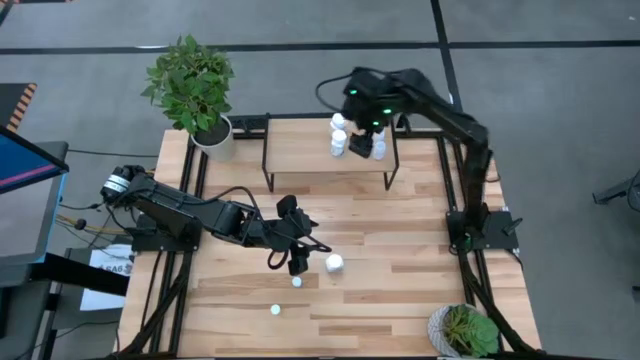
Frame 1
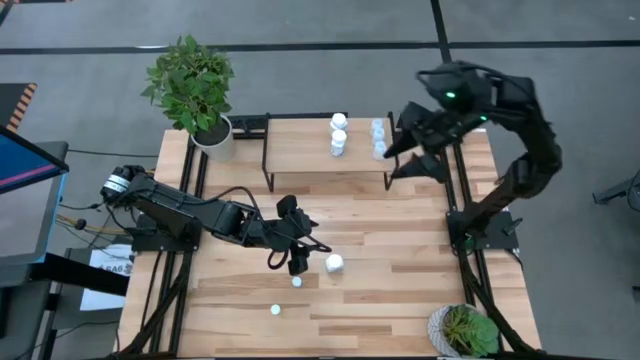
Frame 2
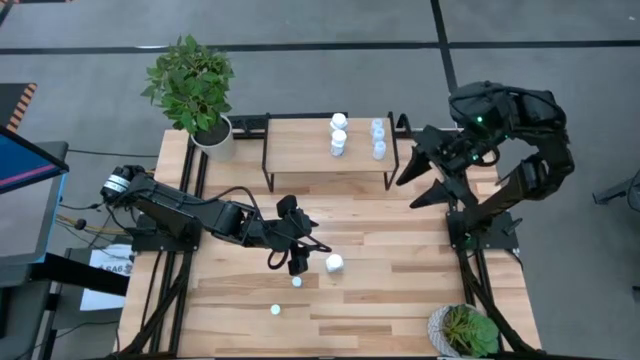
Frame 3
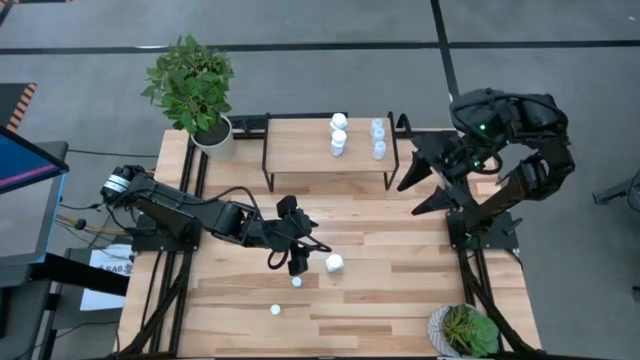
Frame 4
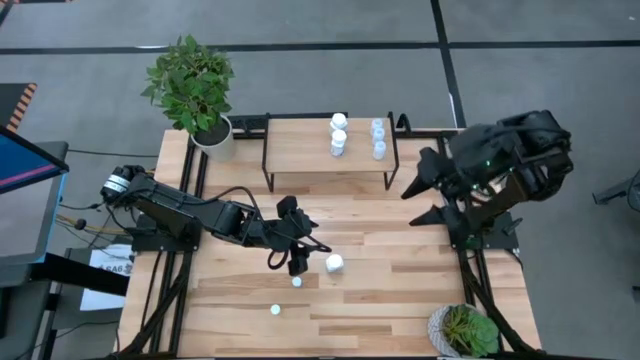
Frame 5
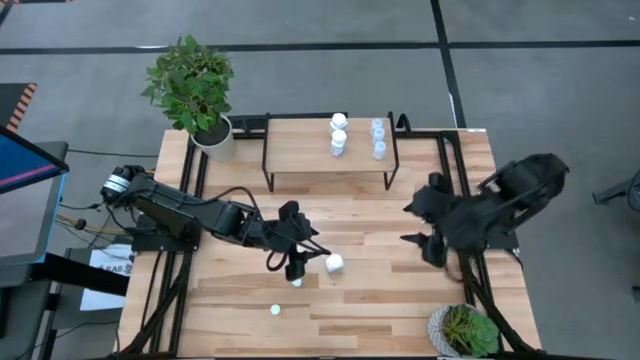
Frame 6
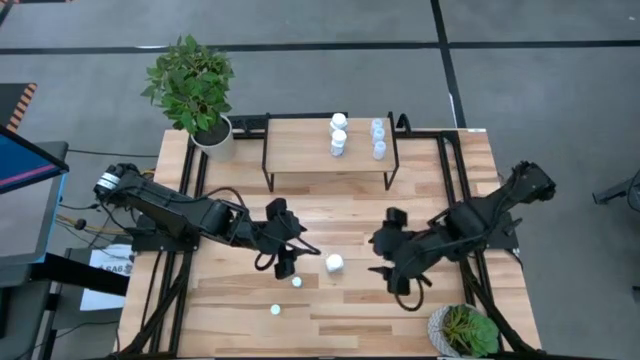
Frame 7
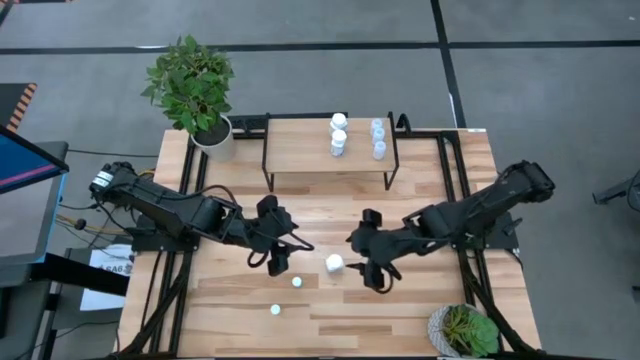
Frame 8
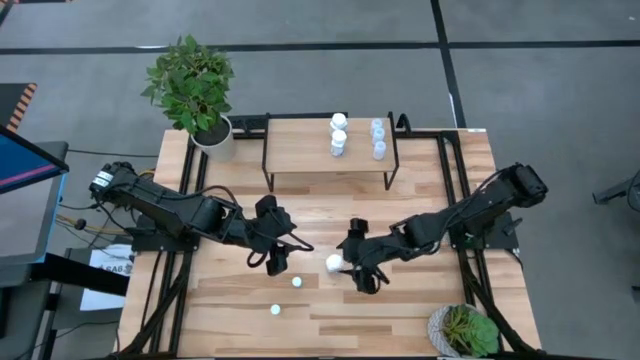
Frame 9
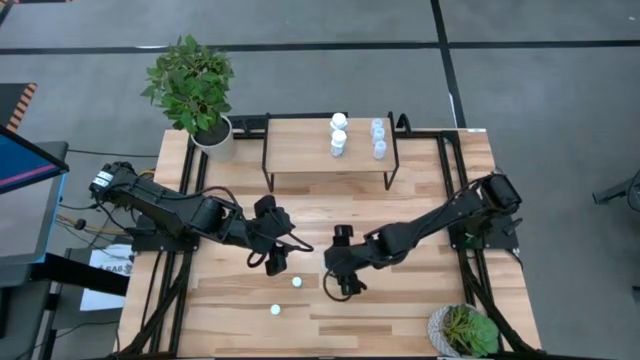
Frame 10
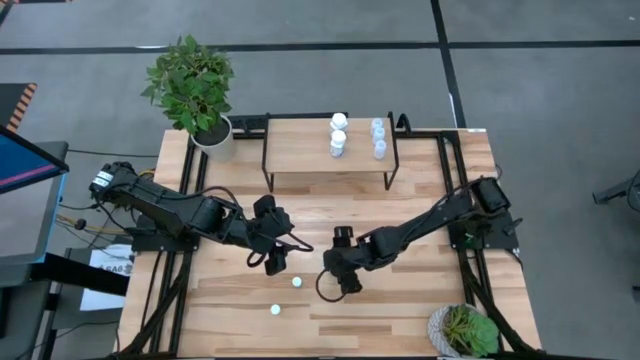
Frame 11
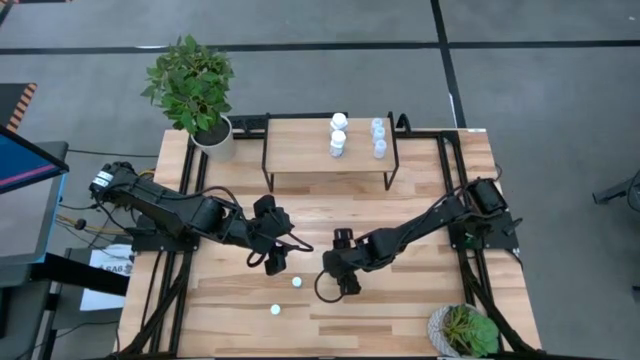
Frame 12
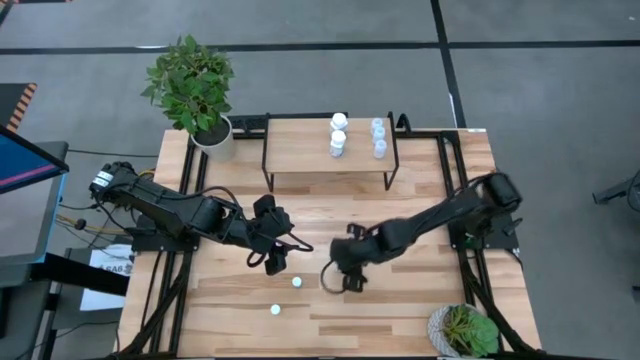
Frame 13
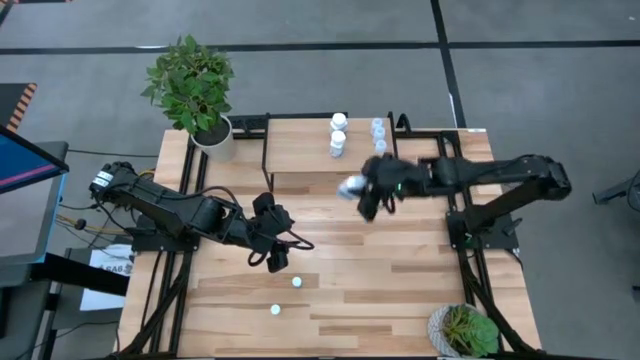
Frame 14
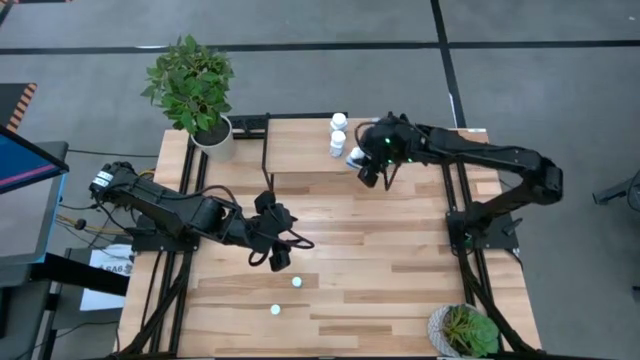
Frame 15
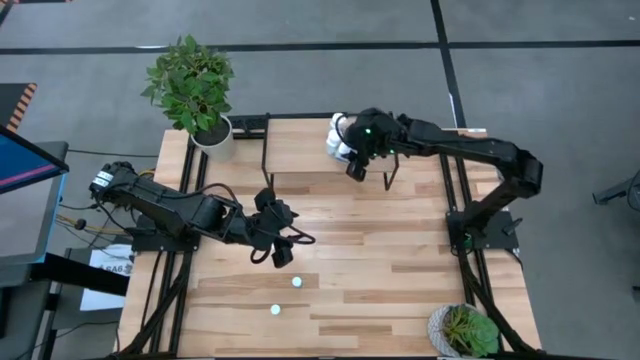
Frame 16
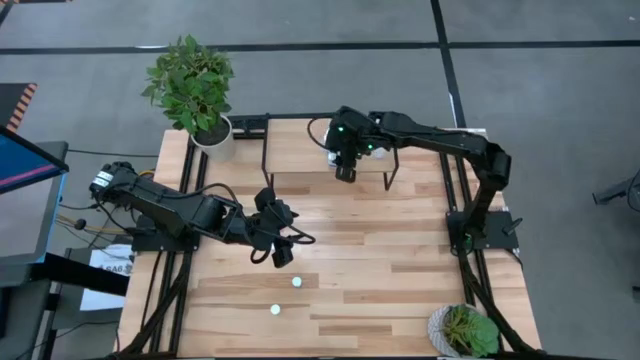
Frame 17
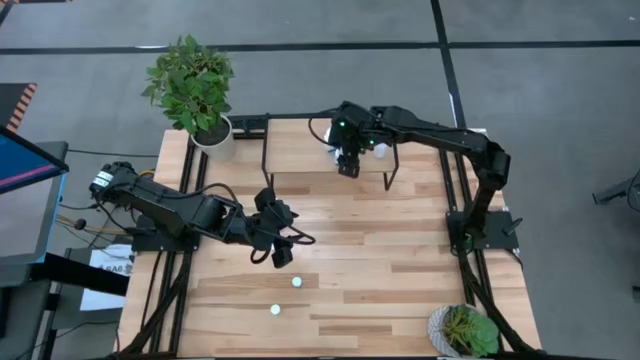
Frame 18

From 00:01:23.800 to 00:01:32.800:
Task: Pick and place medicine bottles onto shelf by color
Put the white medicine bottle on the shelf aligned with the other white medicine bottles

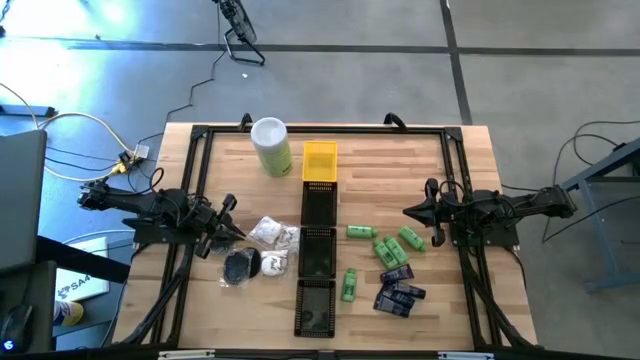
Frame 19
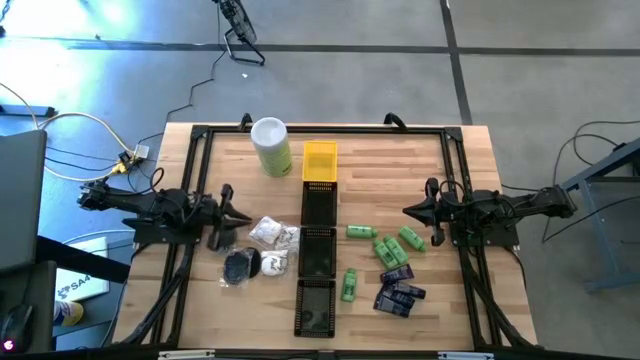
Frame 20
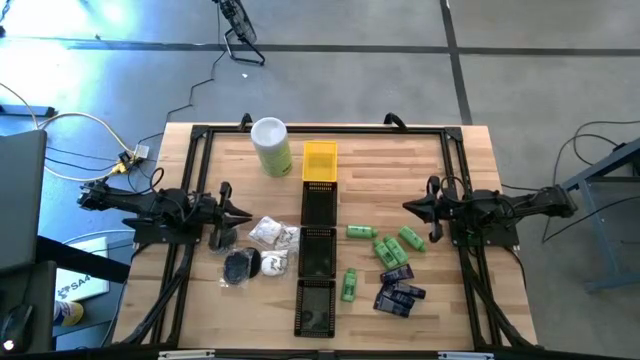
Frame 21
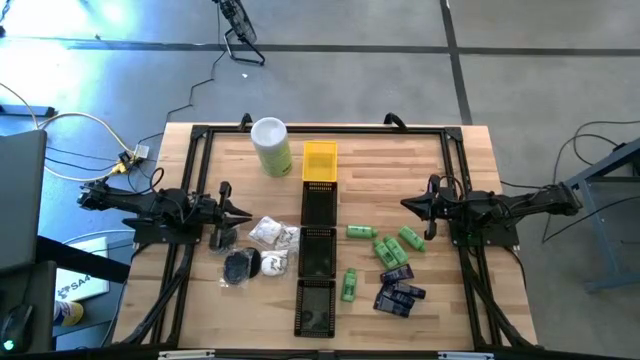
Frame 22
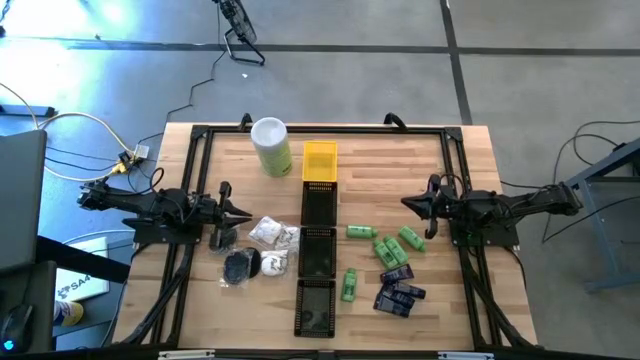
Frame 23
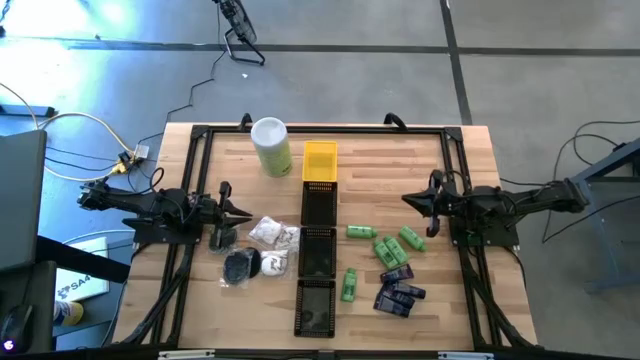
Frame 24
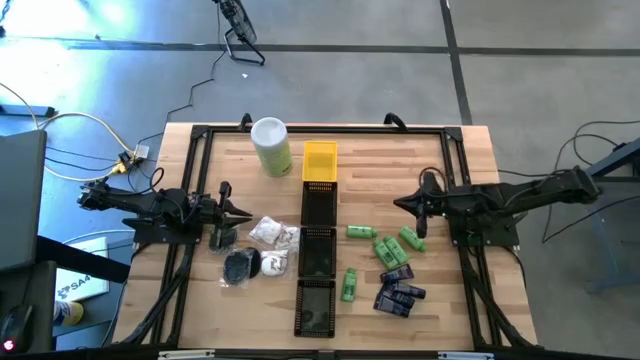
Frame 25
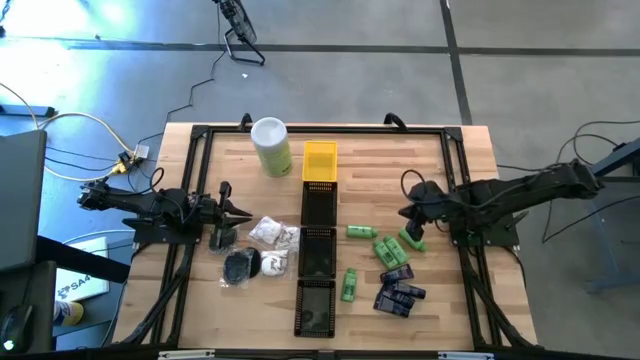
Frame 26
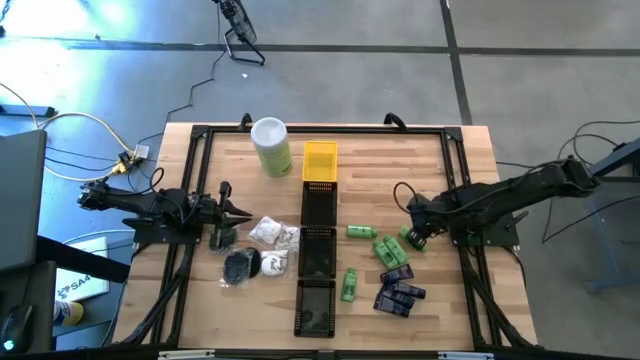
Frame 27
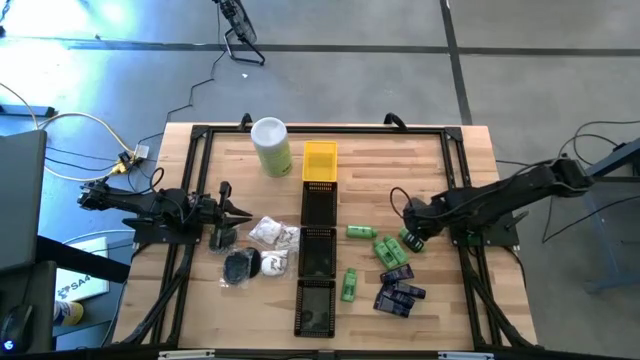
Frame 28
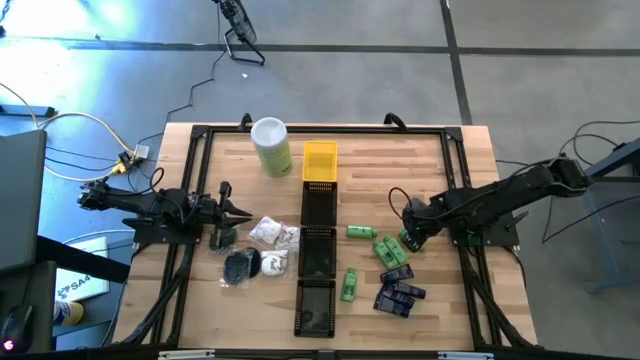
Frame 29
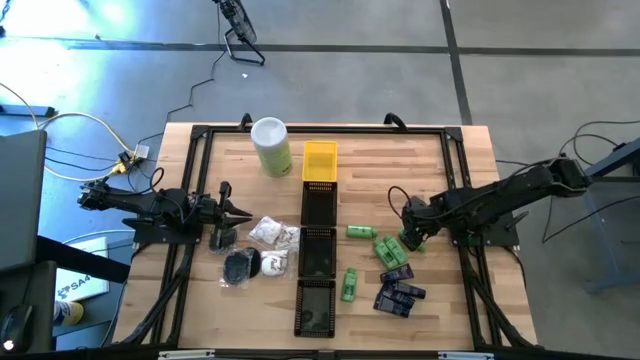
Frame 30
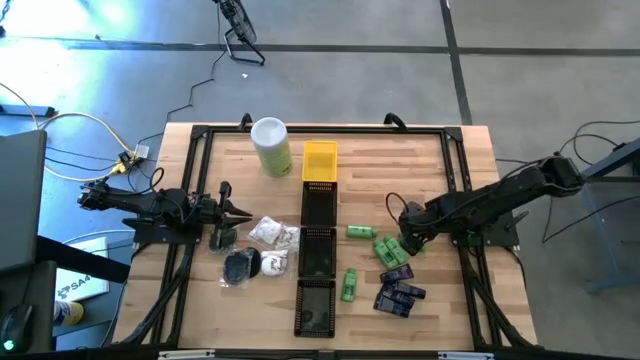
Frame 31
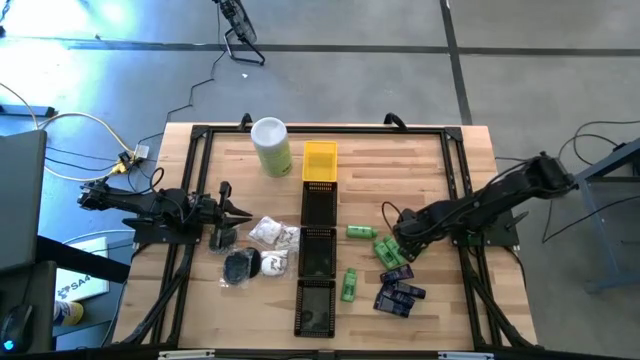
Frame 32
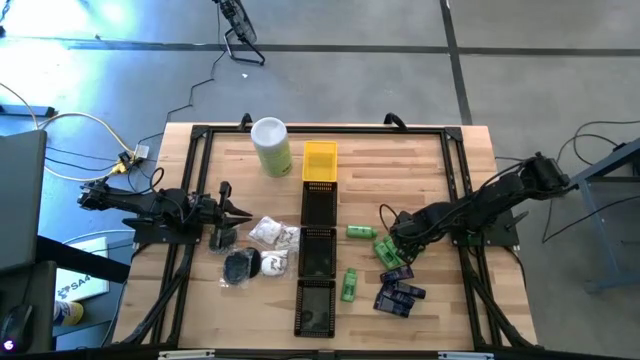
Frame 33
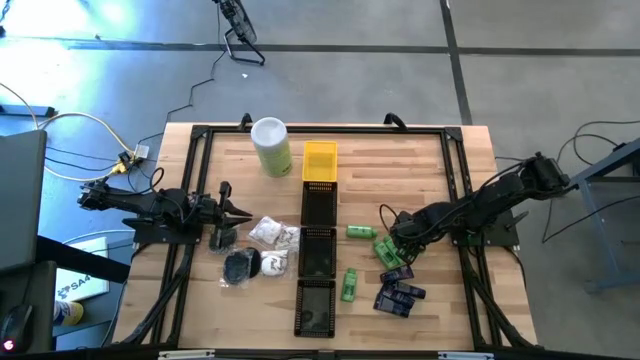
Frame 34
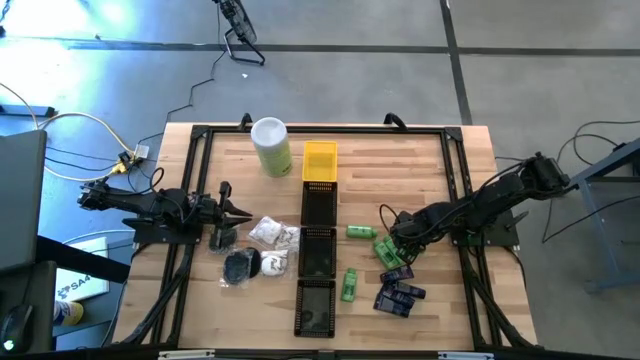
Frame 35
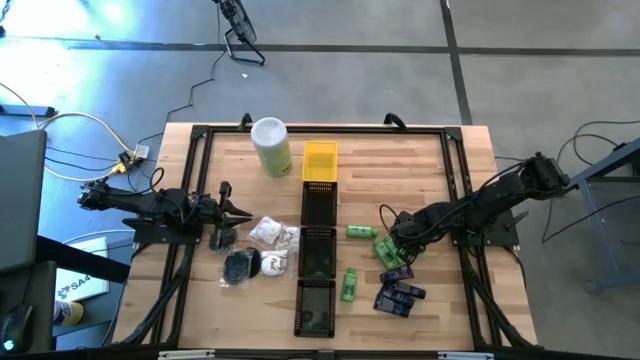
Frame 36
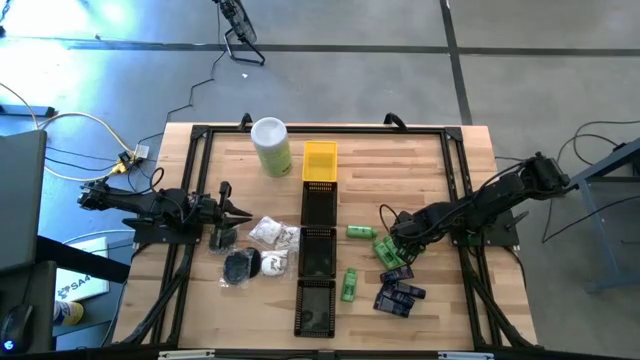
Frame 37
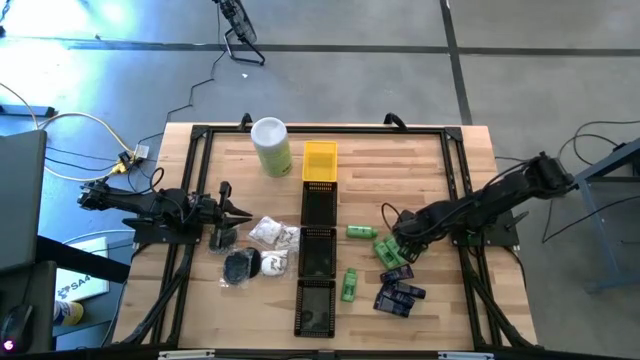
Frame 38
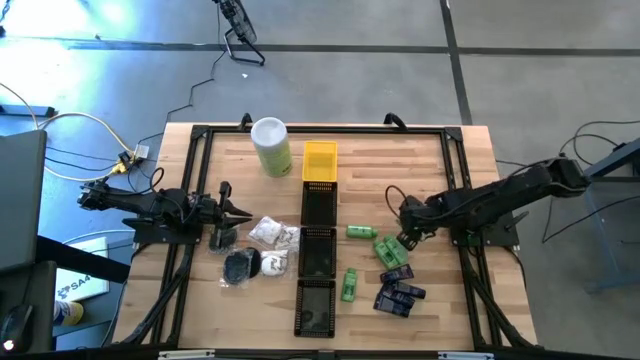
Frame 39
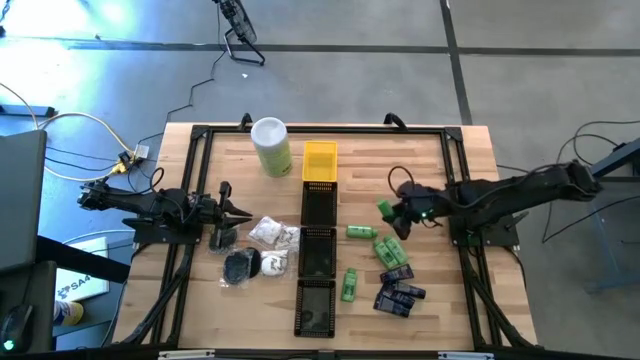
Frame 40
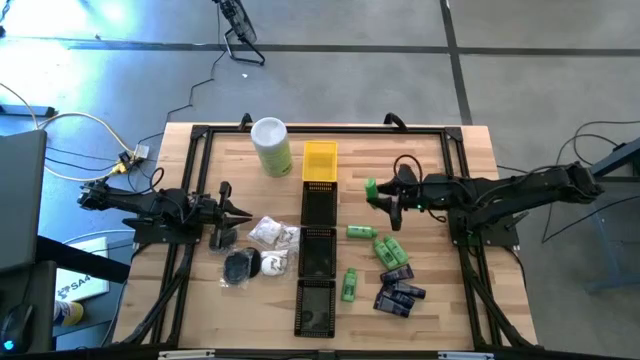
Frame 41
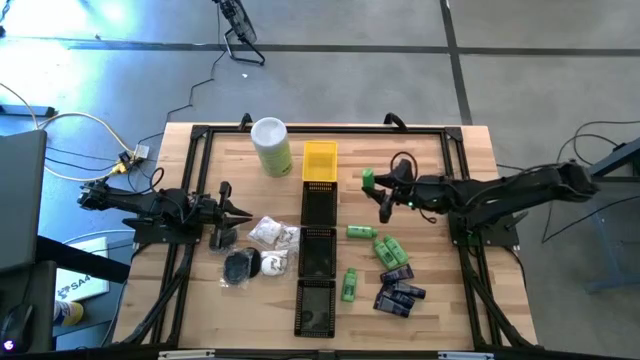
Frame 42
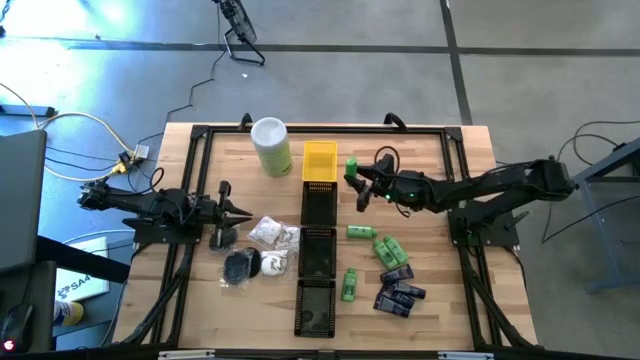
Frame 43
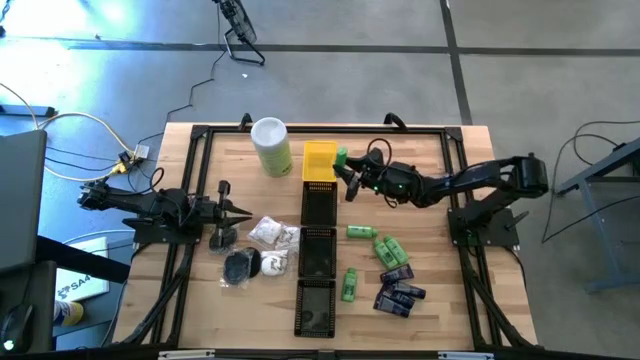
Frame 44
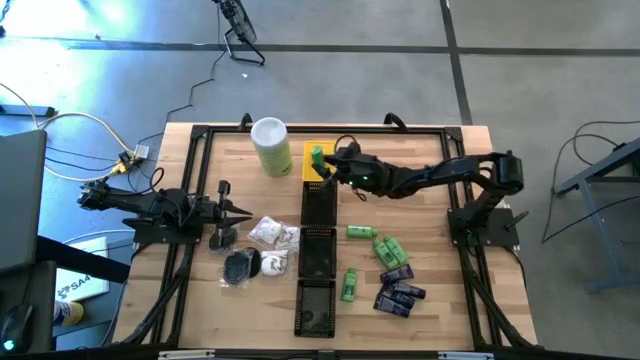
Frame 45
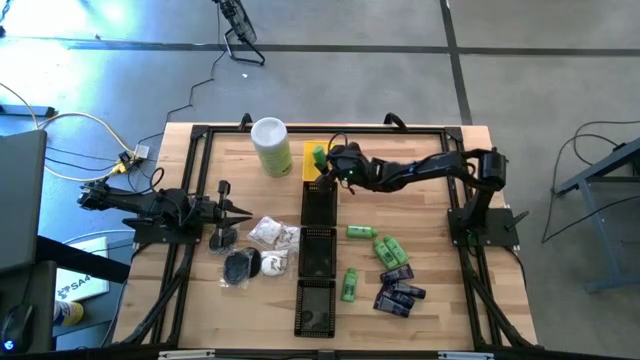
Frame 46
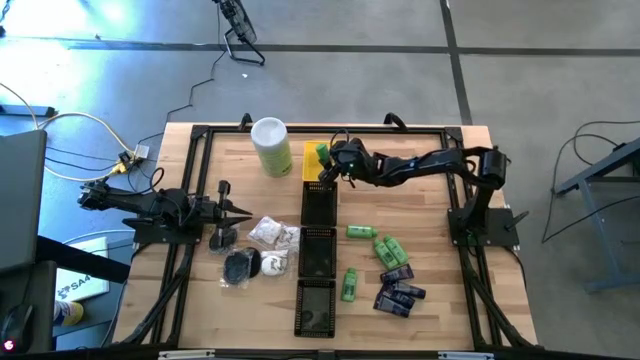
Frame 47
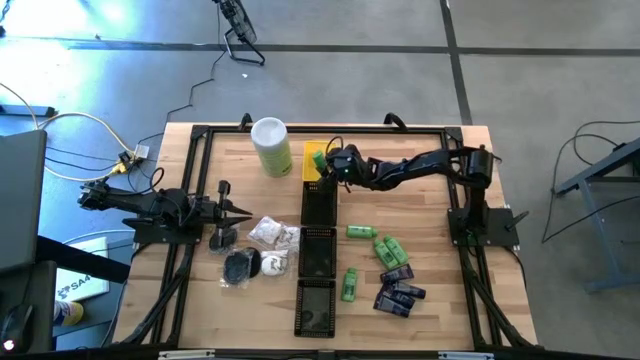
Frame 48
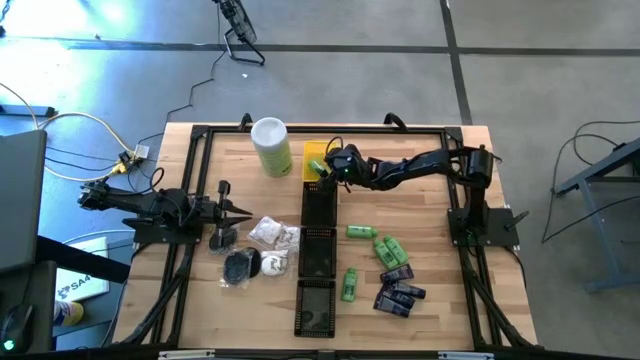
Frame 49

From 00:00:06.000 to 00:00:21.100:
Task: Pick & Place Travel size toiletries
Put the green bottle into the yellow basket
